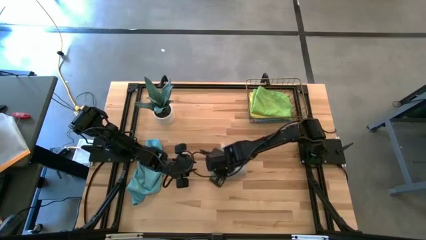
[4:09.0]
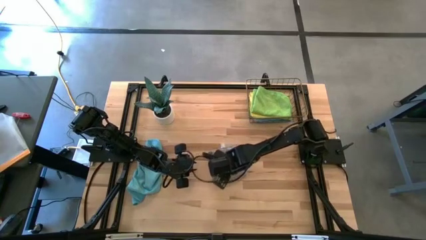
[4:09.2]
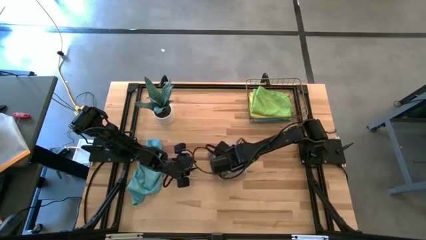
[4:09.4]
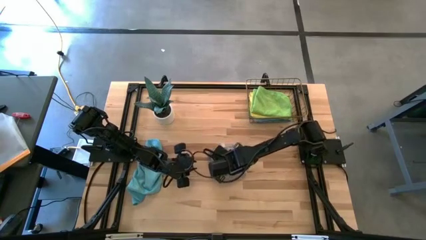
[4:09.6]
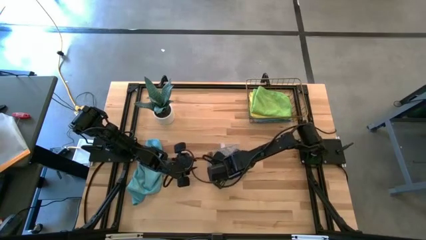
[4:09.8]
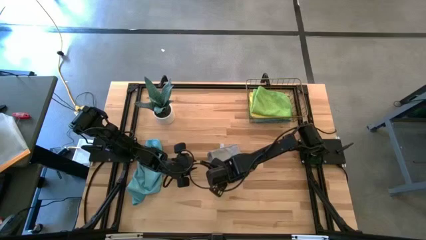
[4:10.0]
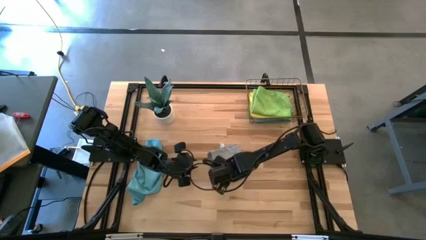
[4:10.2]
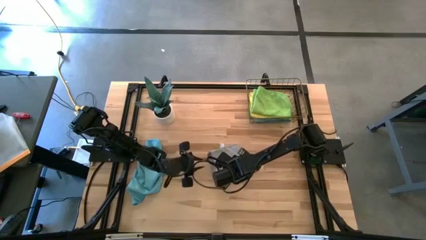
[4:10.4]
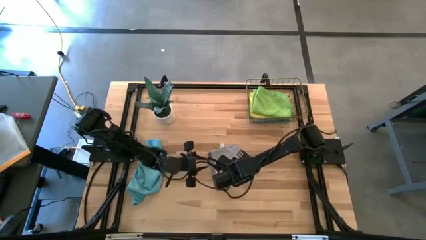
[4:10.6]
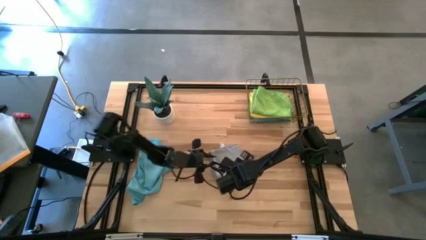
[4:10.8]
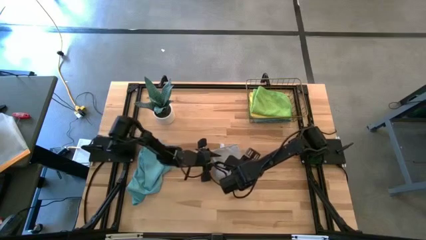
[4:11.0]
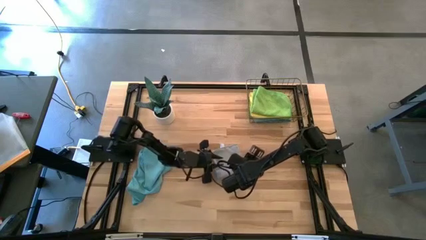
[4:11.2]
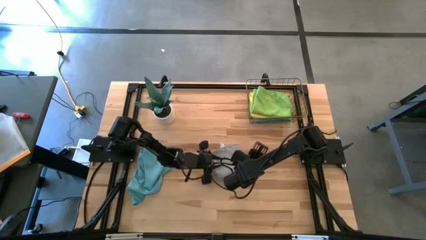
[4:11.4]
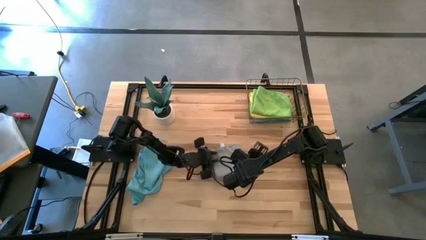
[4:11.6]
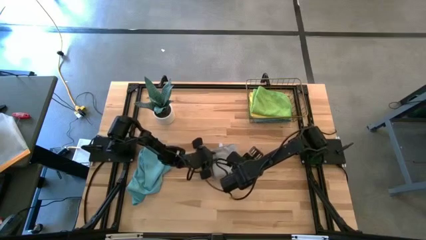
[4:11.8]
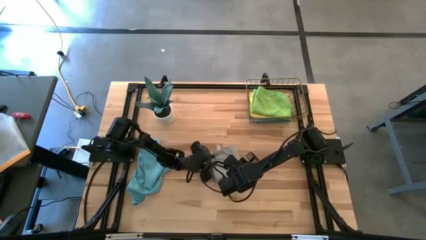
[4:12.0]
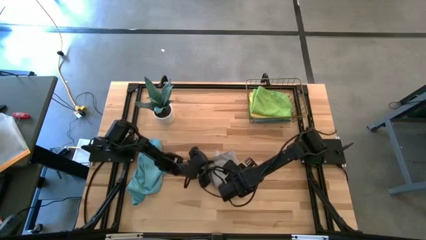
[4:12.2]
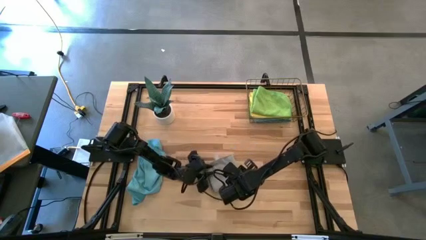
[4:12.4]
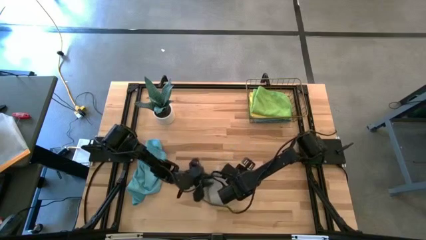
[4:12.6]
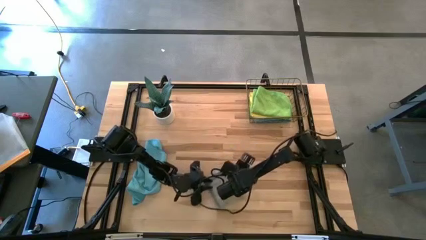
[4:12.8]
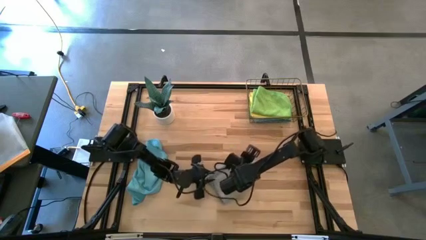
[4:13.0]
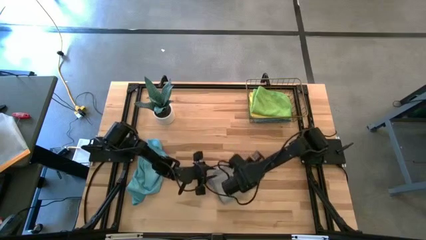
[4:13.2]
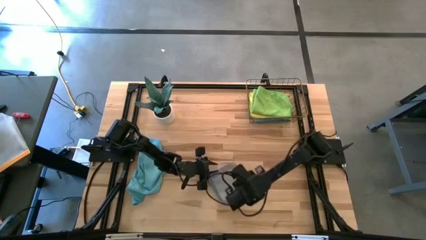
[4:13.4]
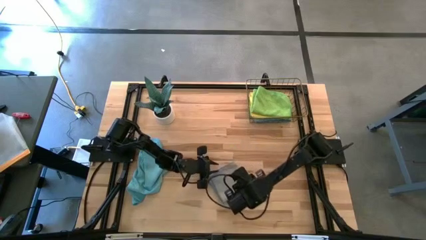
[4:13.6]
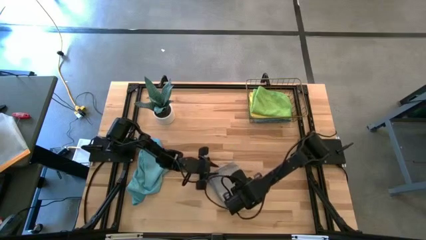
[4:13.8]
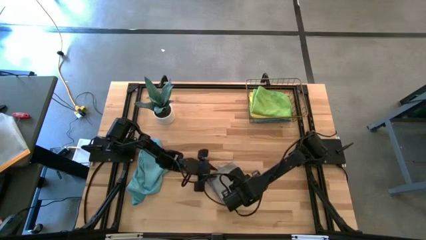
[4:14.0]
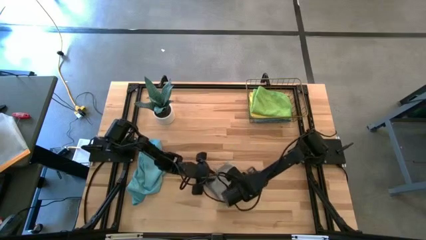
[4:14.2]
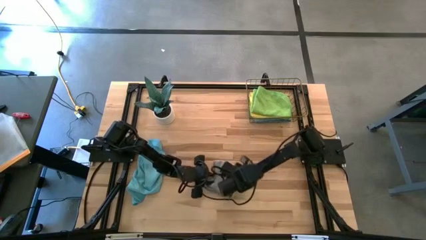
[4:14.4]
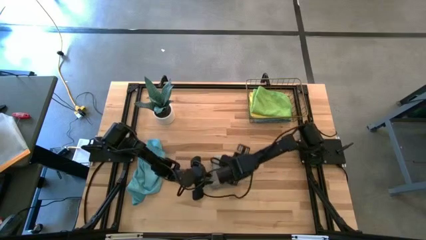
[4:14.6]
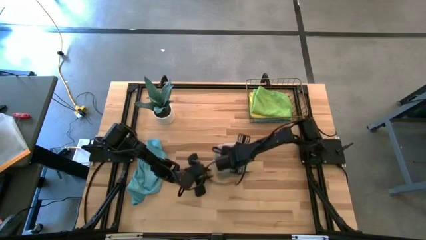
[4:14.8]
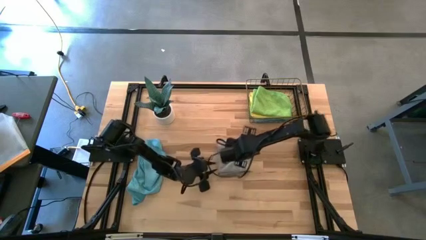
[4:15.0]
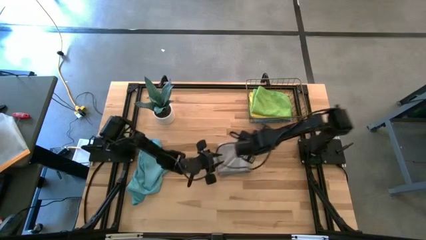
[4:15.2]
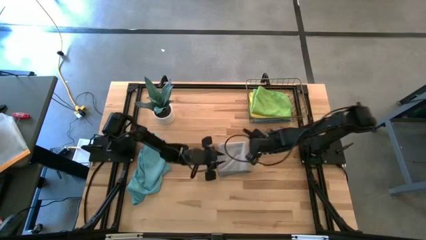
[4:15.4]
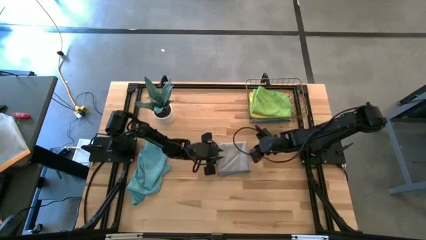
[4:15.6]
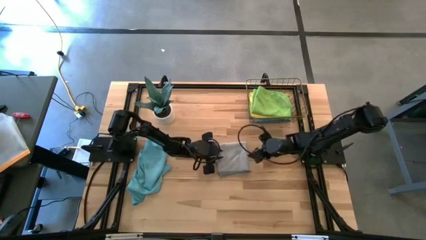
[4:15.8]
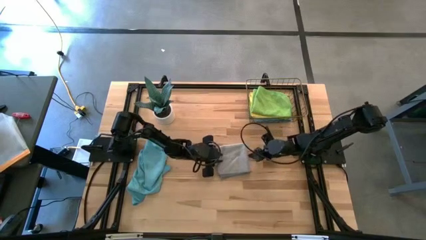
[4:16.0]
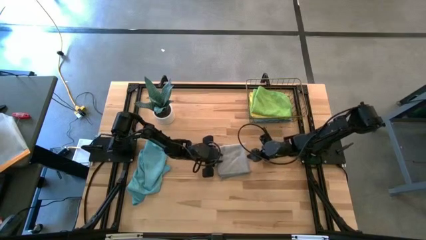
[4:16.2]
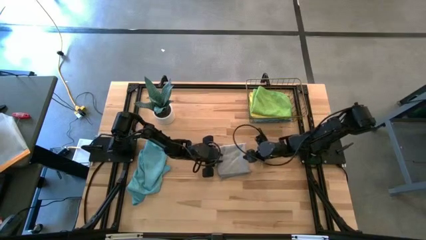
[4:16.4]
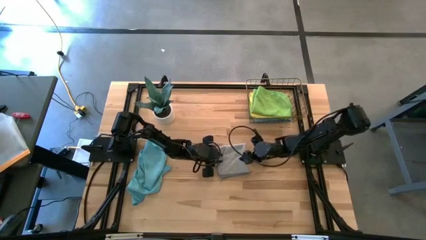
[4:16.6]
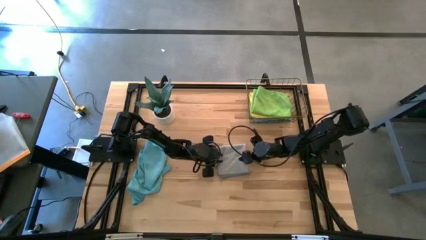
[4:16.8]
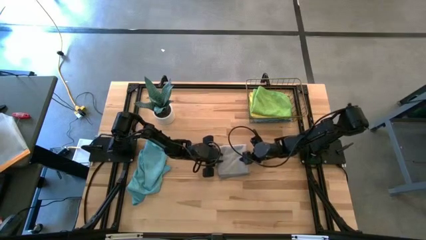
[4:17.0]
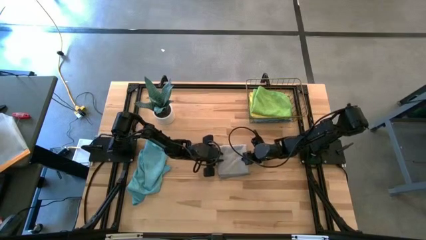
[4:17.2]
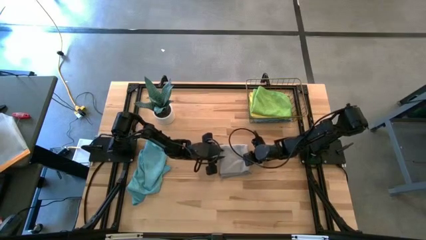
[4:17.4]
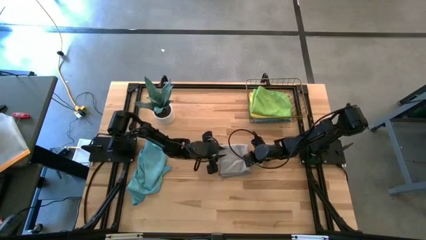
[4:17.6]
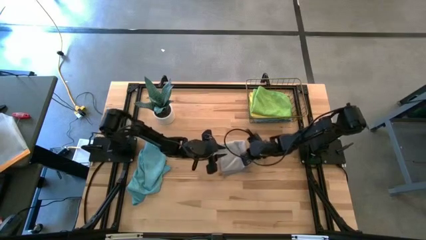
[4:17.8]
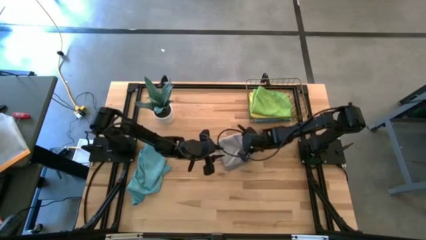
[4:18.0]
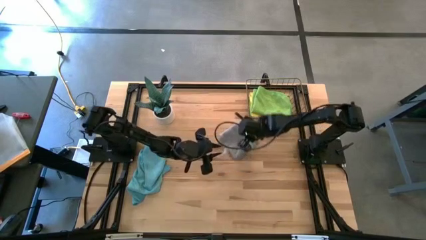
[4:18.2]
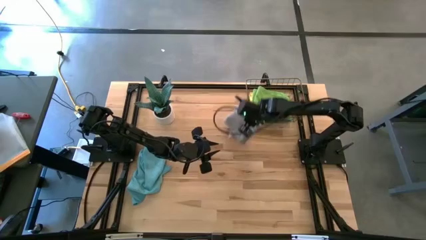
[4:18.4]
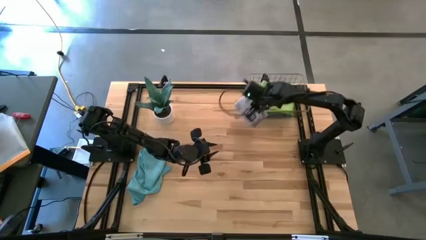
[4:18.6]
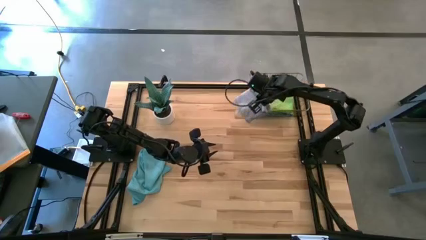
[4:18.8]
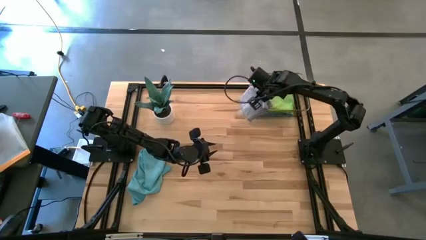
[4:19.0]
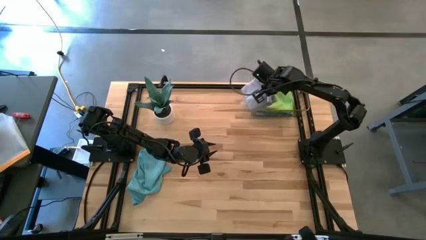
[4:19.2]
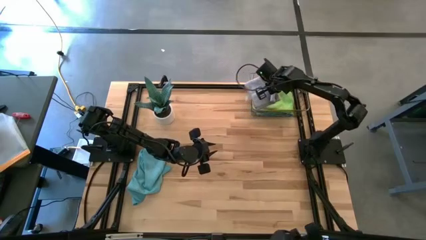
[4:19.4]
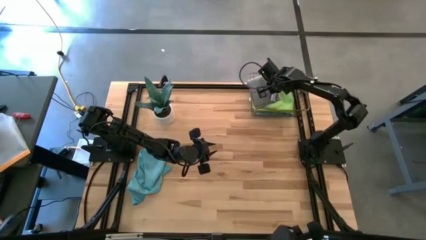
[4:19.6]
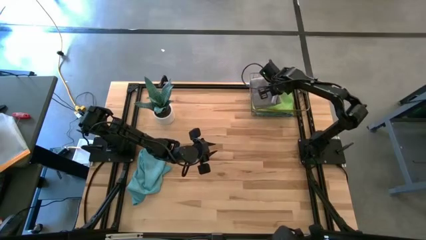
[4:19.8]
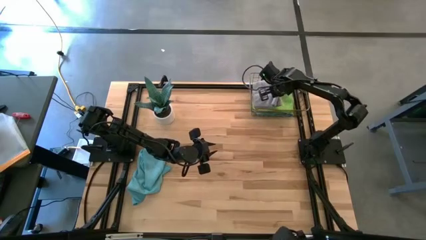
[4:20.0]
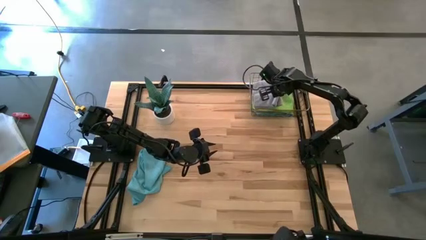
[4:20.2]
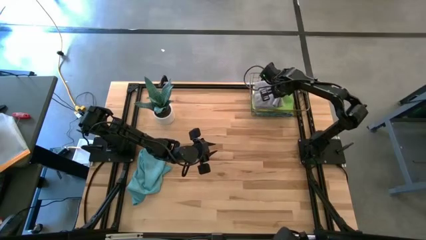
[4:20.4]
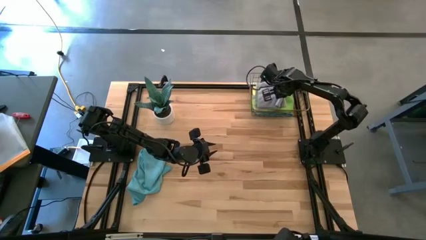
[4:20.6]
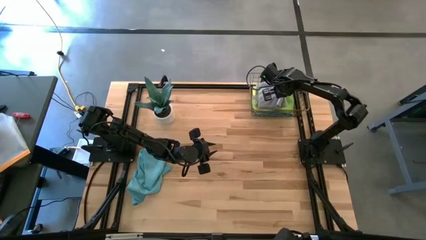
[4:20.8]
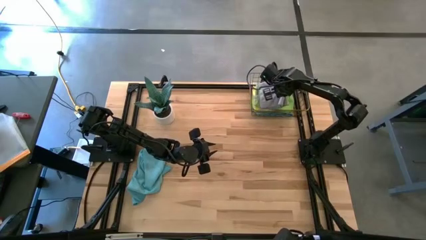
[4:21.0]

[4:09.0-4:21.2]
Task: Fold microfiber towels
Put the gray towel into the wire basket
